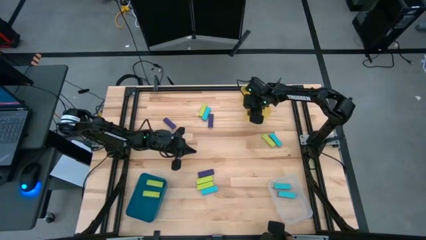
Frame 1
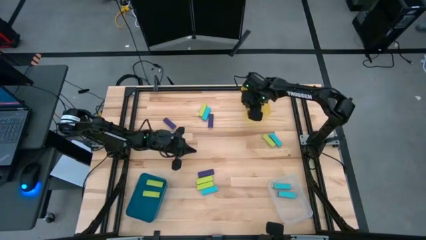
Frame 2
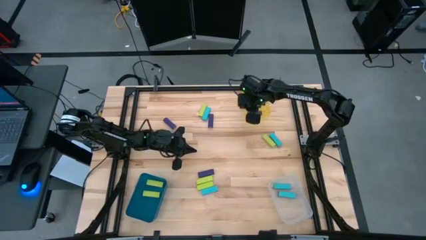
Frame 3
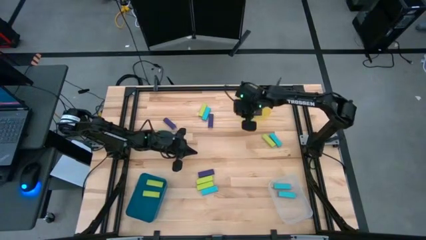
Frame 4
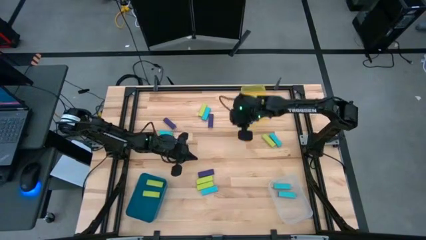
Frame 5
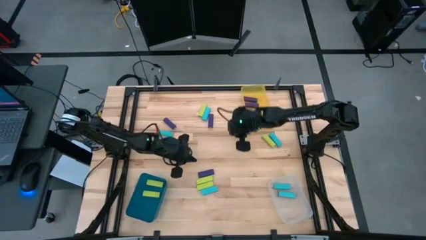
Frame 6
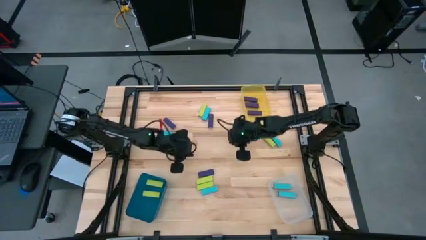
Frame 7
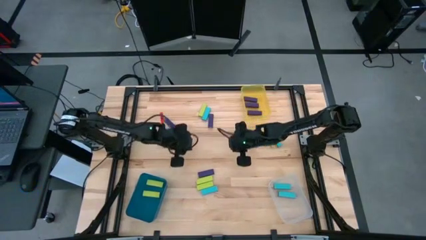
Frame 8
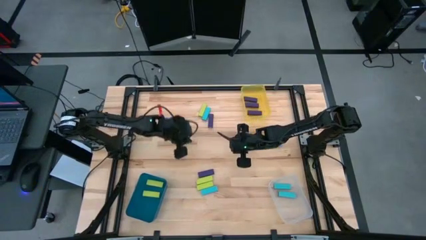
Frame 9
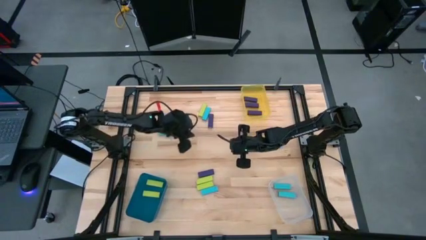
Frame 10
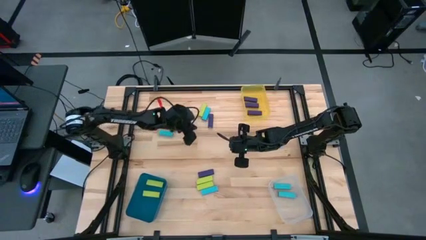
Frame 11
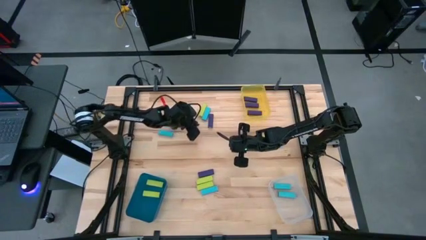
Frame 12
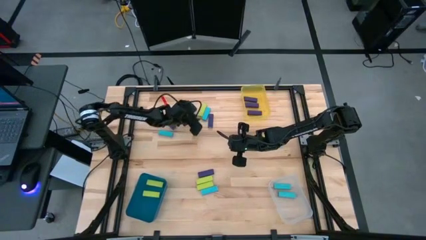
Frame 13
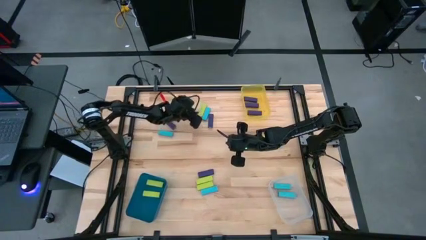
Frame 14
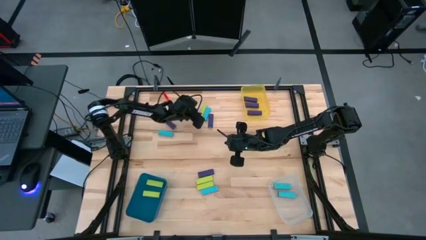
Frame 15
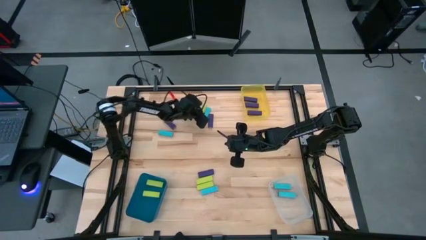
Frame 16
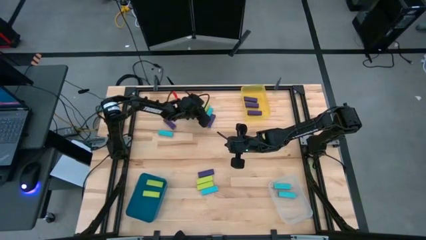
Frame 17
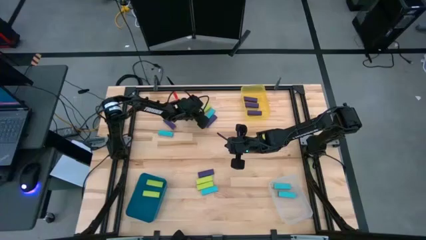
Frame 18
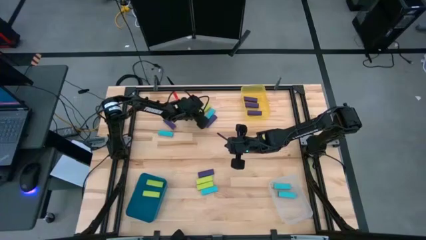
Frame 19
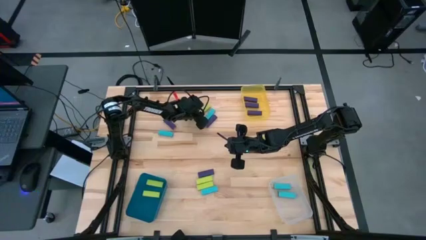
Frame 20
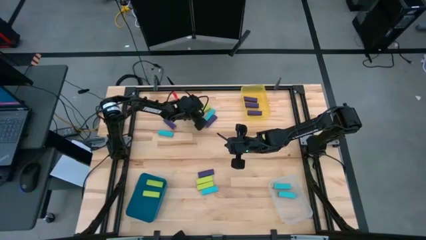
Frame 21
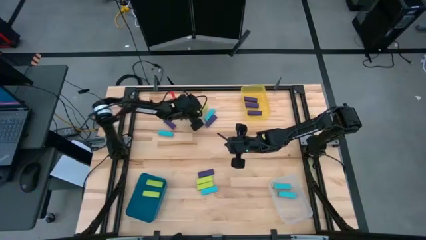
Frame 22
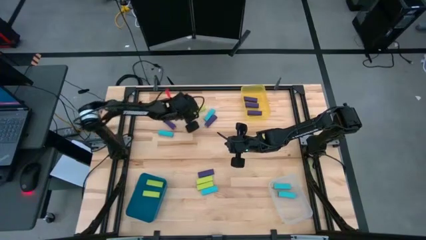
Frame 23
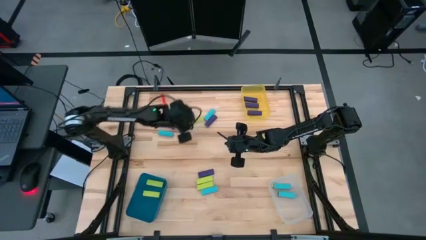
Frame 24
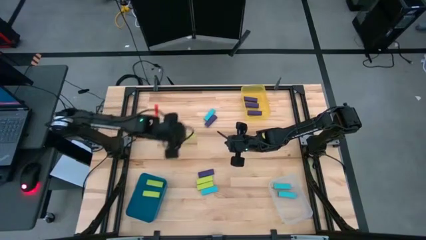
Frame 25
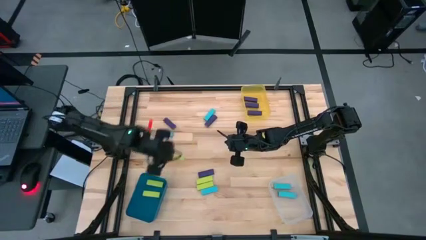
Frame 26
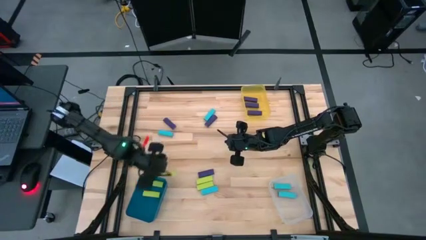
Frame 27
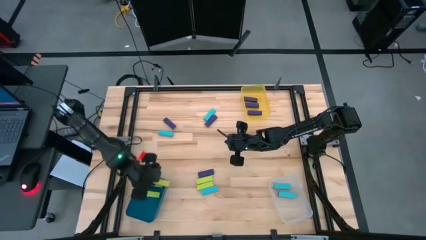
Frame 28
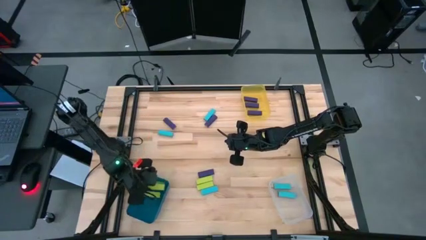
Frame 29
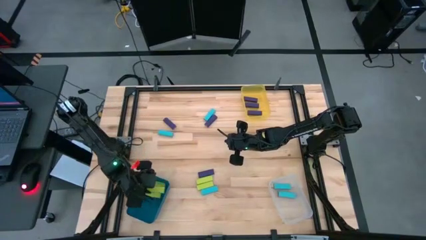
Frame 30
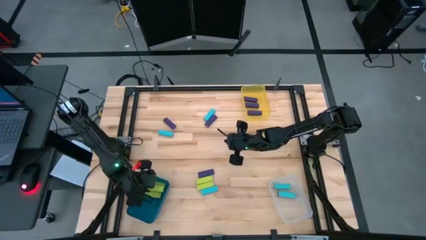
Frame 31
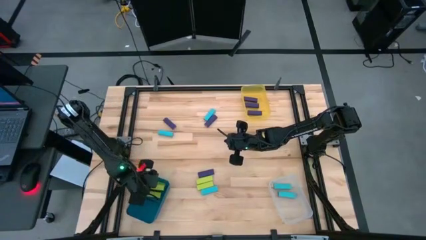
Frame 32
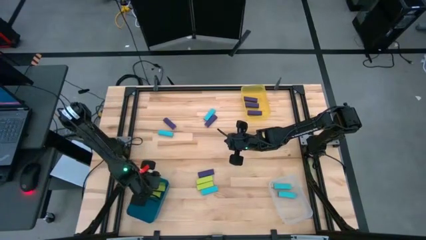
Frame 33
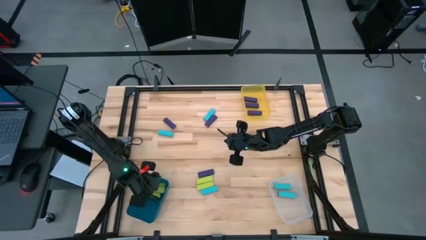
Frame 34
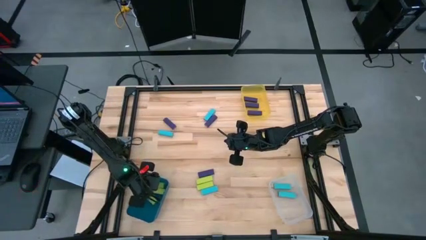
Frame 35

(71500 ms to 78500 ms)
Task: Sort blocks
Put the green block into the blue bin

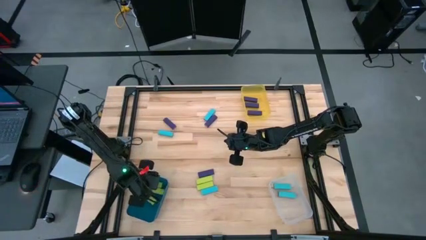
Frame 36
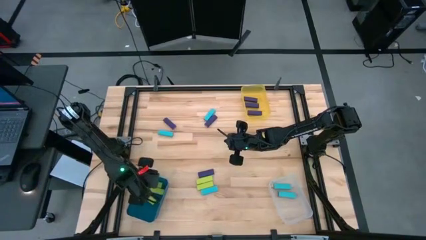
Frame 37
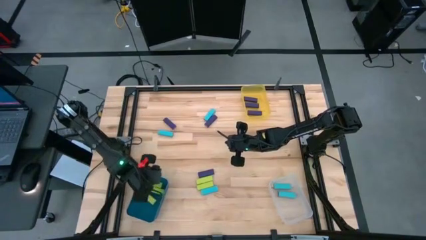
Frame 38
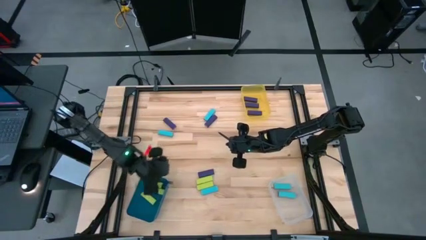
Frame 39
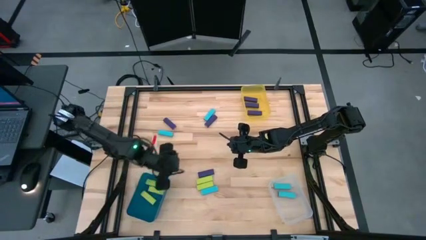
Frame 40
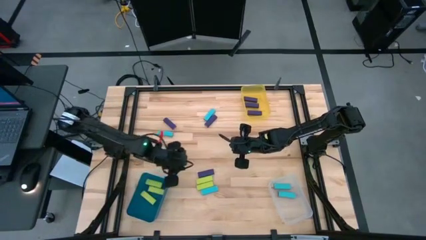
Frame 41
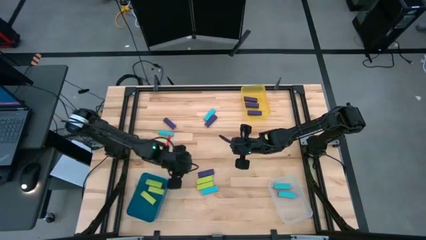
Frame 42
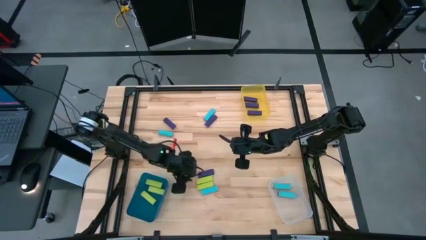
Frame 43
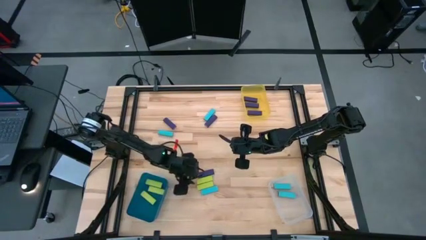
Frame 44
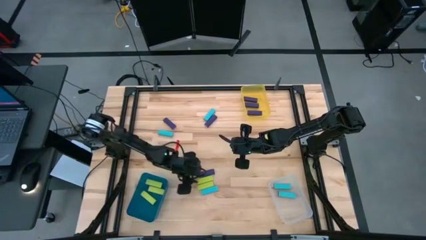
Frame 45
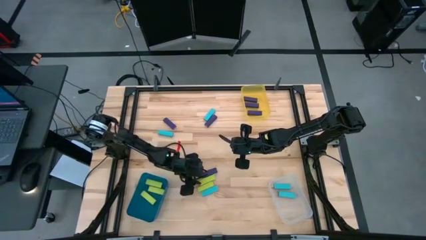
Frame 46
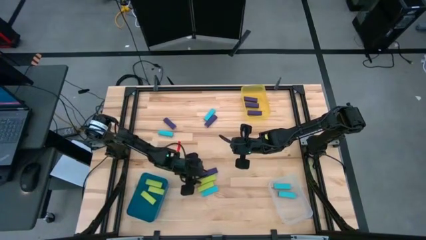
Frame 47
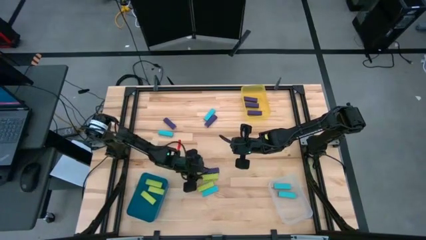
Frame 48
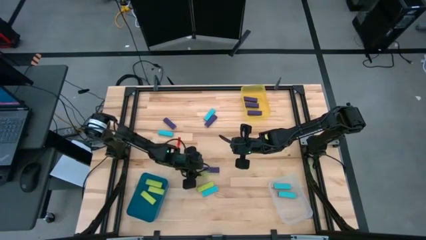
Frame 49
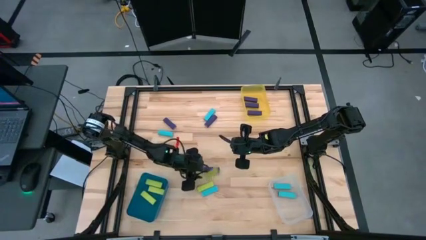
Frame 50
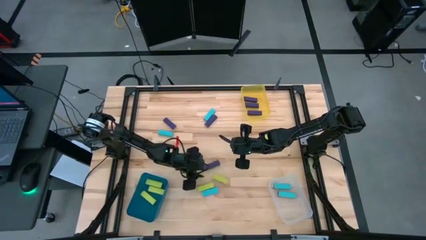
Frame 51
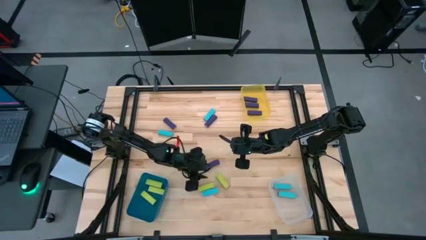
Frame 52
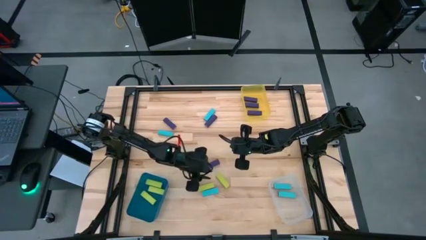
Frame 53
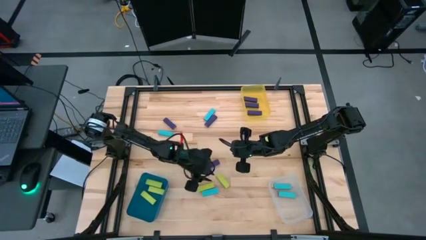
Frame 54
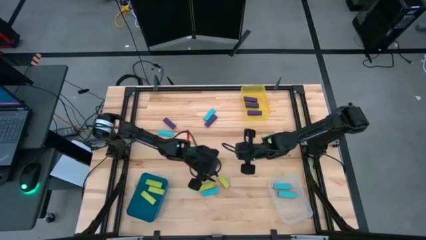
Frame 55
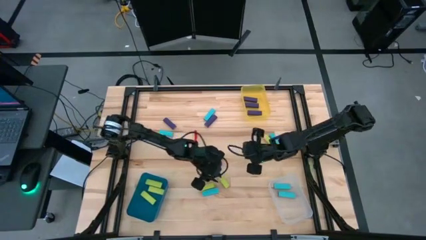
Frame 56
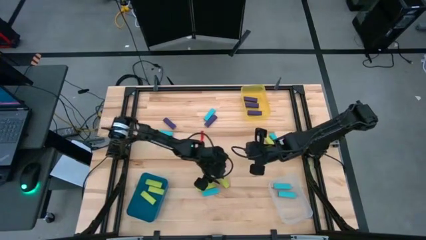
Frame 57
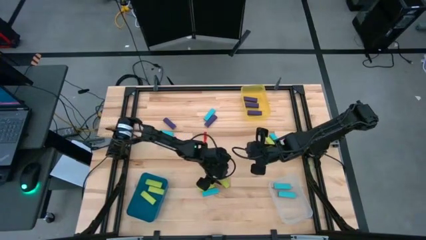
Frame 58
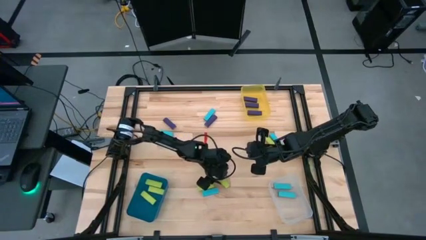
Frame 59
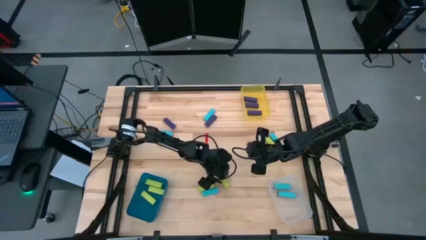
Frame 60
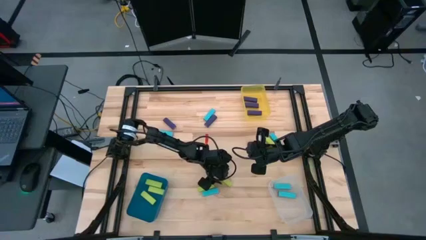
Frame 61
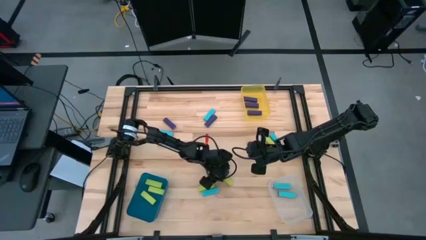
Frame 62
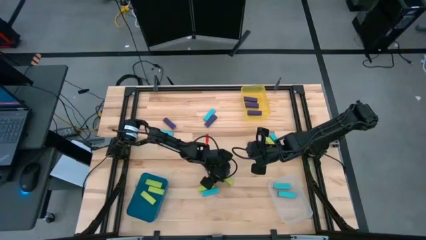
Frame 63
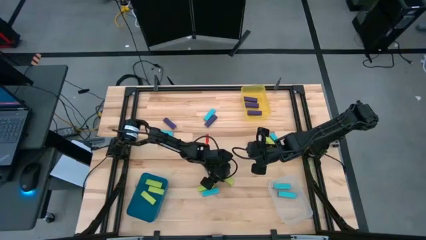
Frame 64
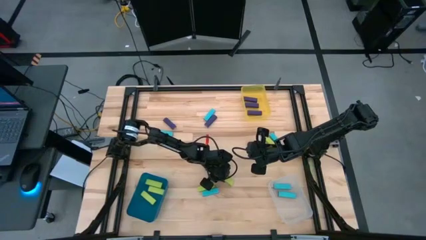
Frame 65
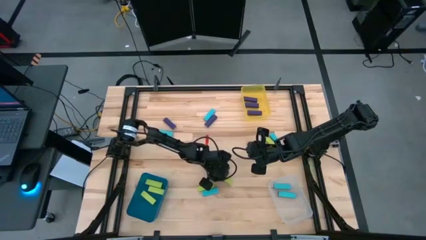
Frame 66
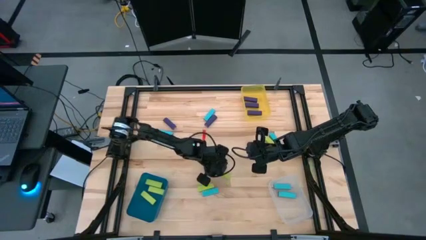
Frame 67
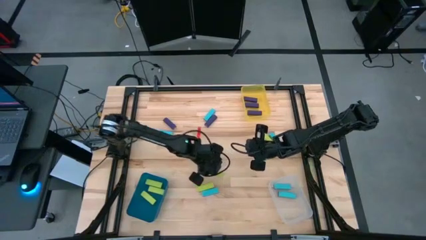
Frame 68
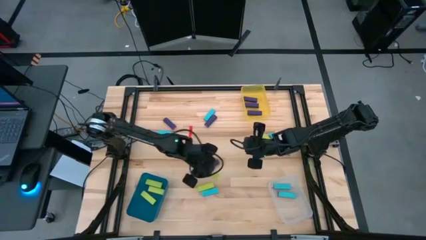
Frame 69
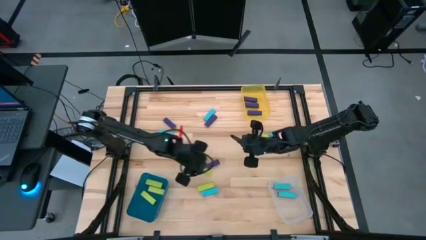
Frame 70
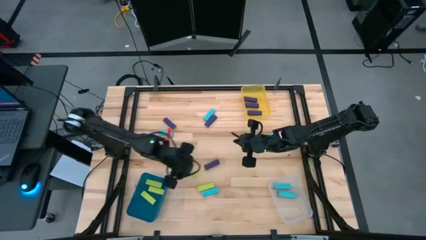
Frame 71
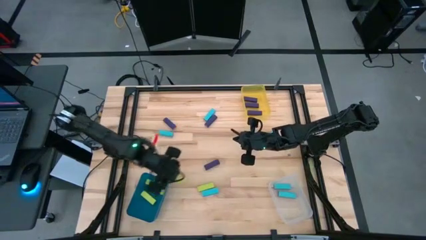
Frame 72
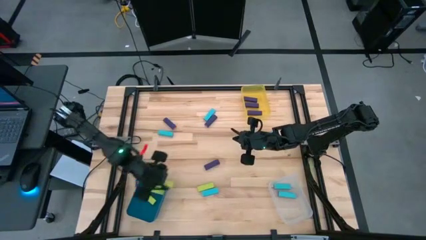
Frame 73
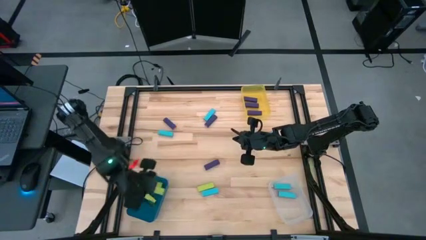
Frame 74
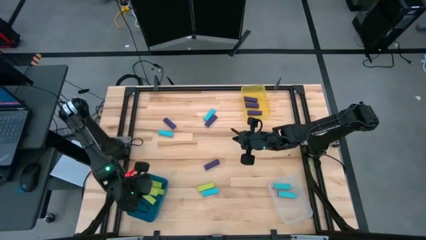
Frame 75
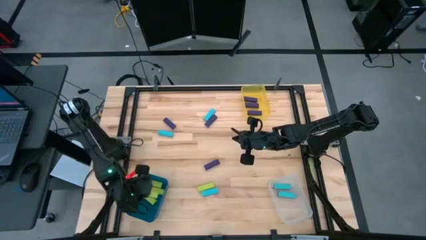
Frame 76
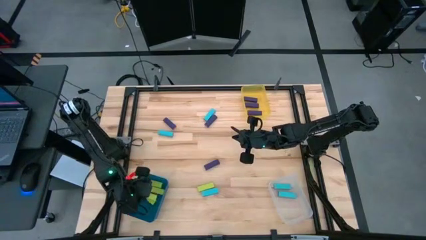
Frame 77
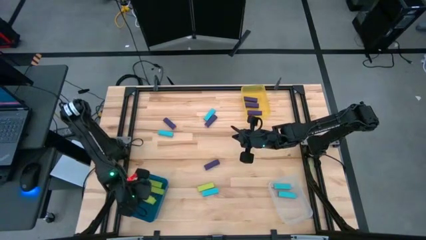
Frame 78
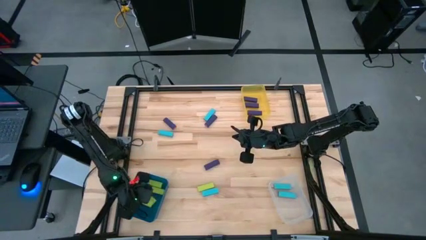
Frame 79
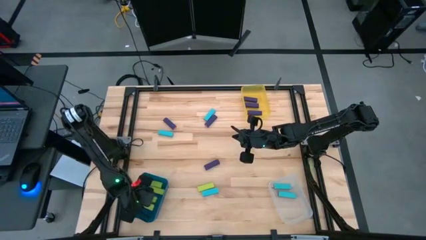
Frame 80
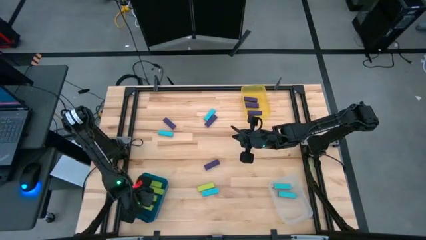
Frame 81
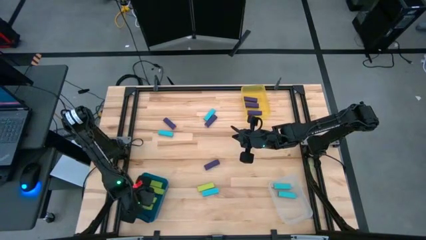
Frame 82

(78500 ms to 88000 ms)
Put the green block into the blue bin

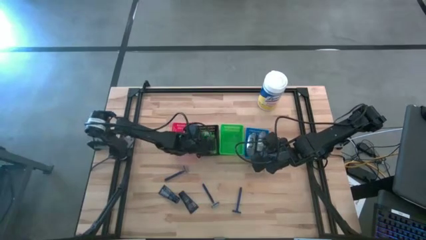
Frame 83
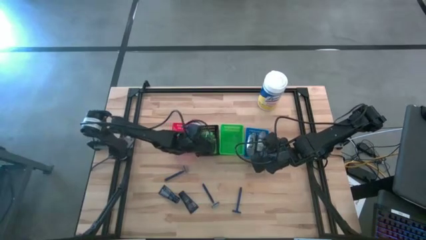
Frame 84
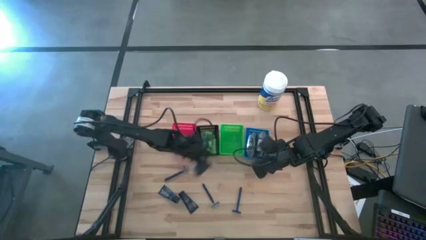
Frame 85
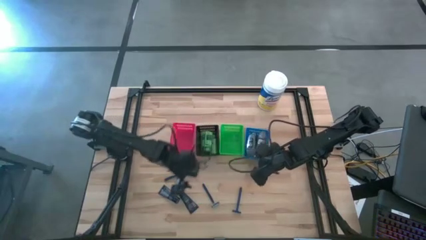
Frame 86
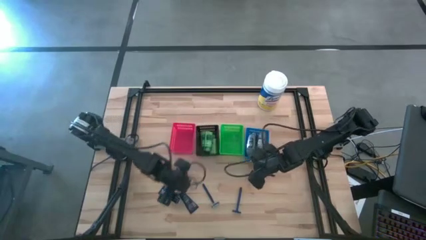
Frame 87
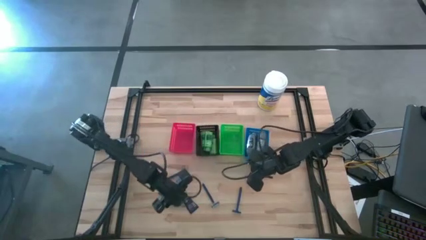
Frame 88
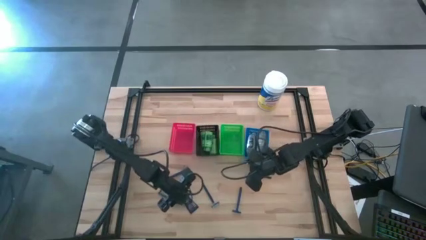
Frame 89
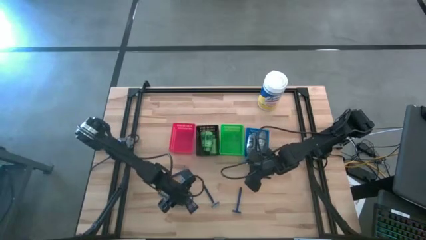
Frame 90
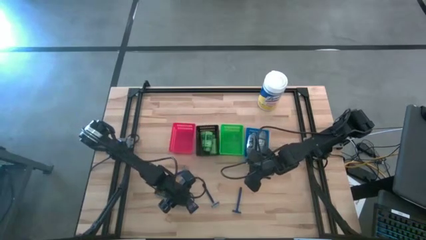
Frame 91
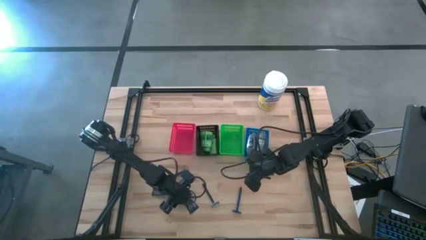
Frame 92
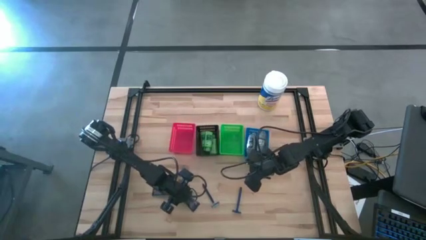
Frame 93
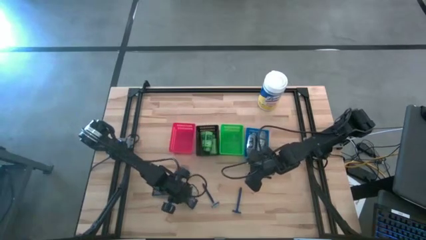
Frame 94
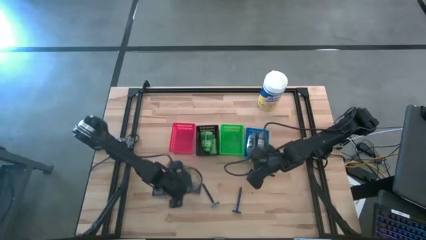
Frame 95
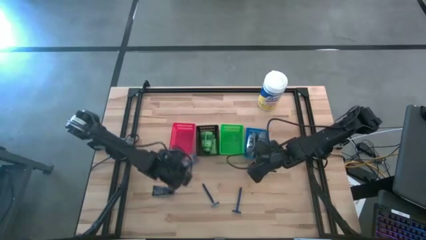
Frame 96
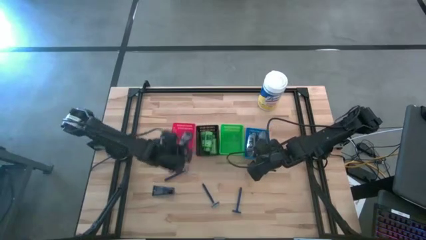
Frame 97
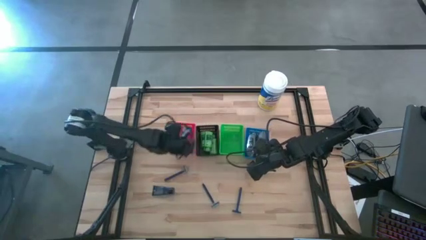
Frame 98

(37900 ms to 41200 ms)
Task: Pick & Place Travel size toiletries
Put the blue shave cream into the red bin
